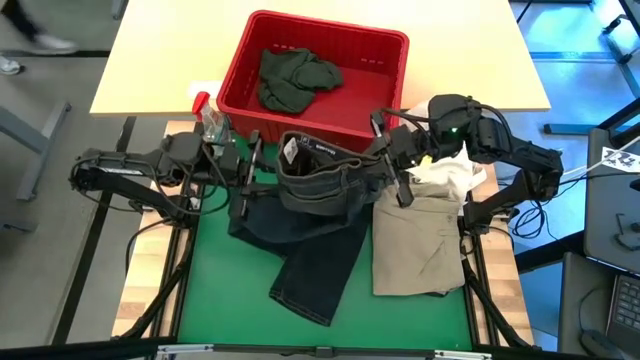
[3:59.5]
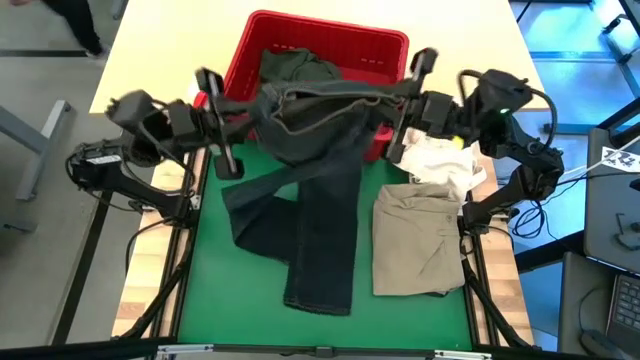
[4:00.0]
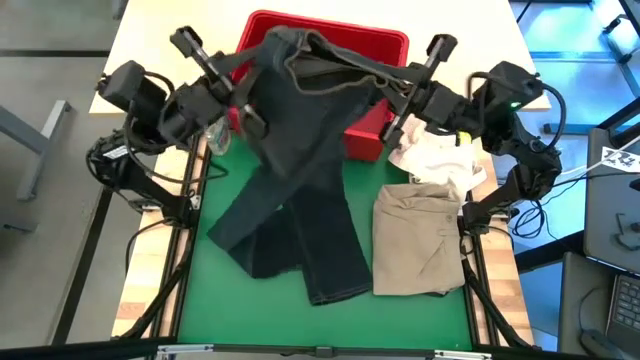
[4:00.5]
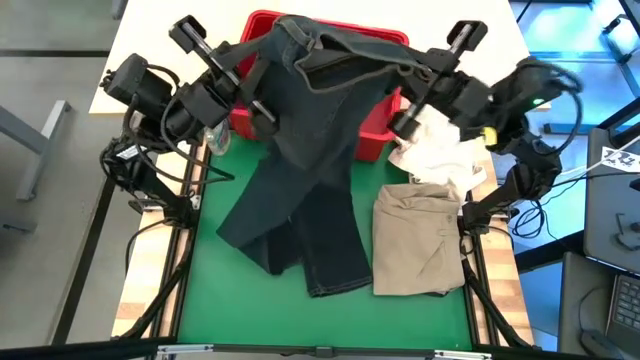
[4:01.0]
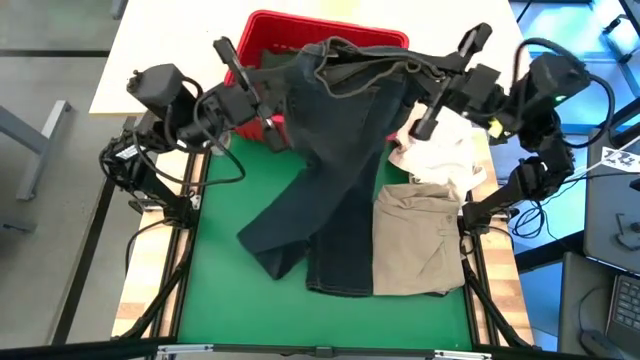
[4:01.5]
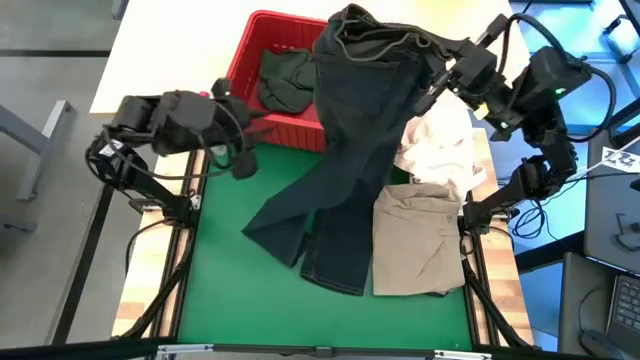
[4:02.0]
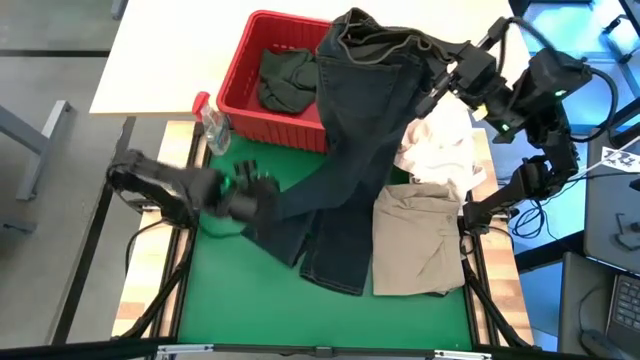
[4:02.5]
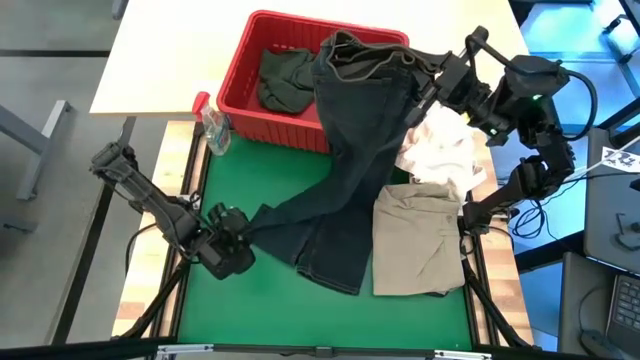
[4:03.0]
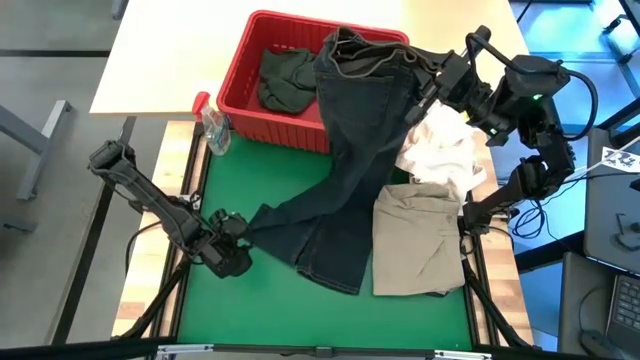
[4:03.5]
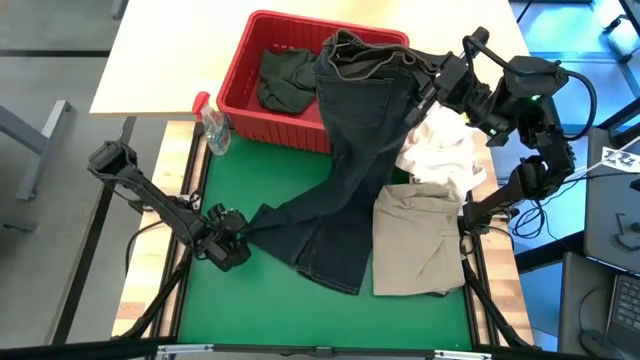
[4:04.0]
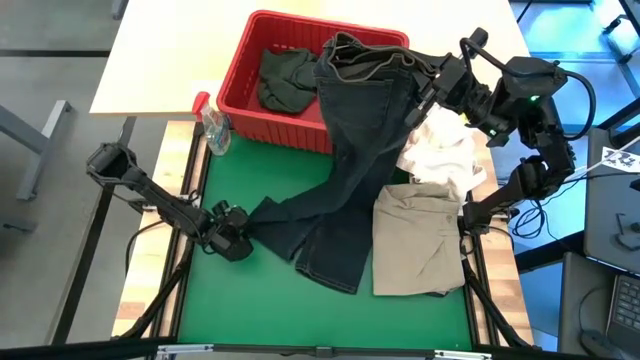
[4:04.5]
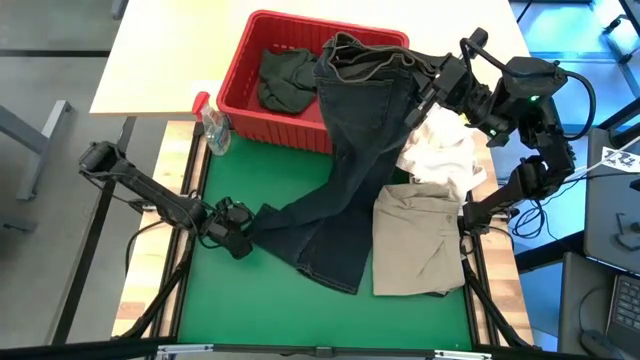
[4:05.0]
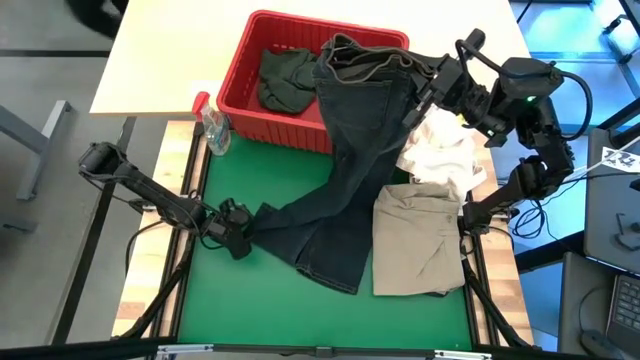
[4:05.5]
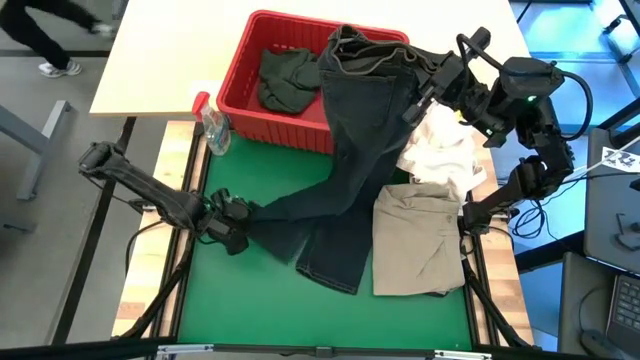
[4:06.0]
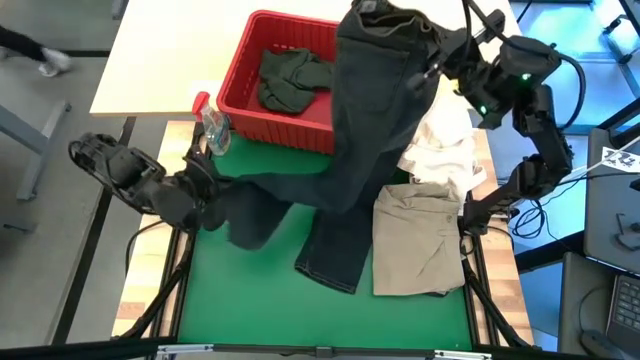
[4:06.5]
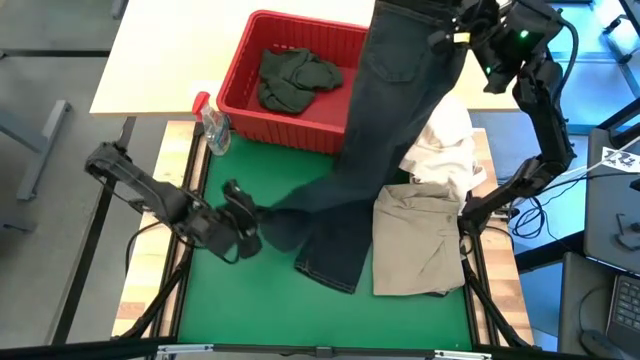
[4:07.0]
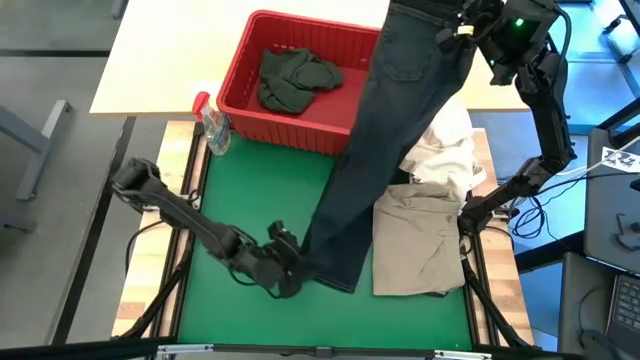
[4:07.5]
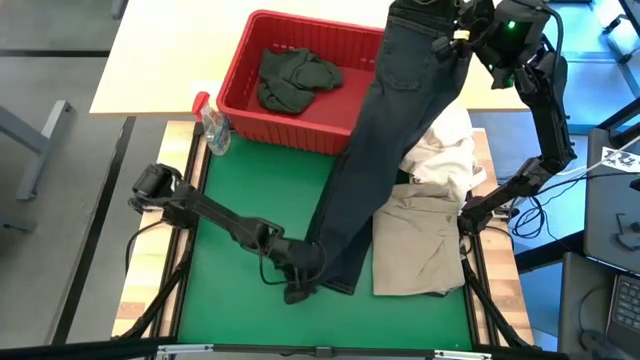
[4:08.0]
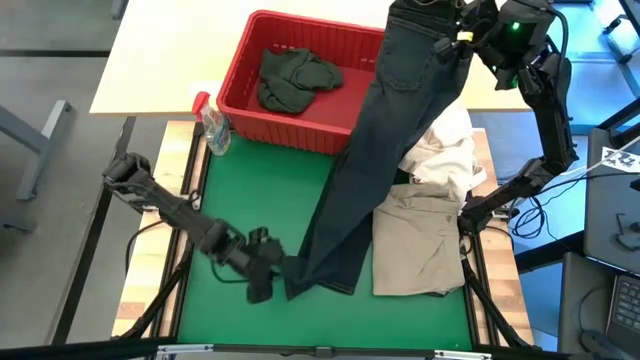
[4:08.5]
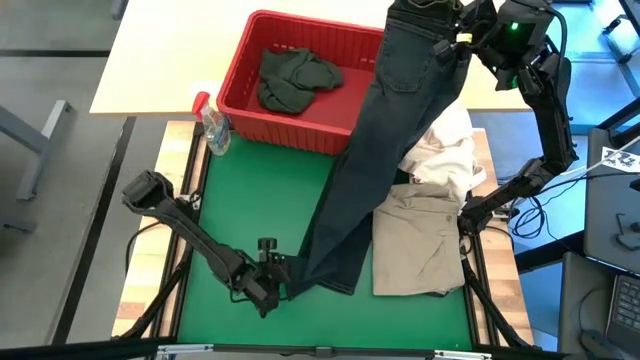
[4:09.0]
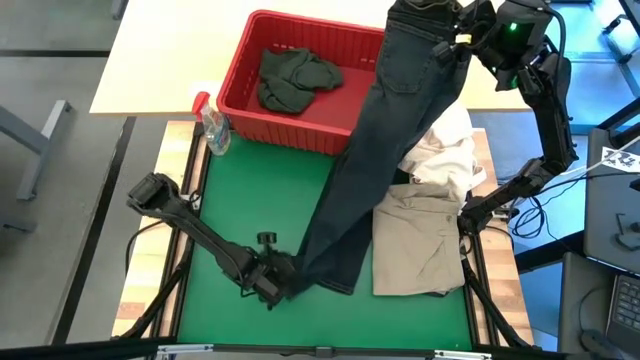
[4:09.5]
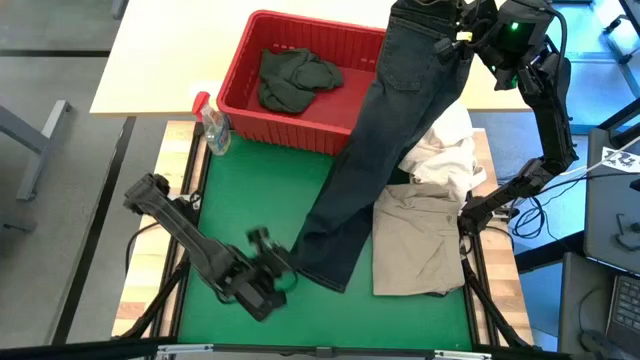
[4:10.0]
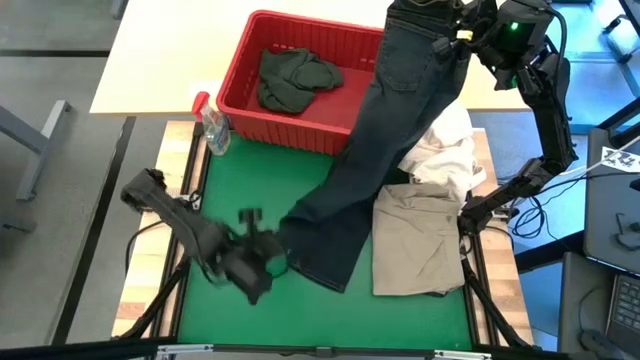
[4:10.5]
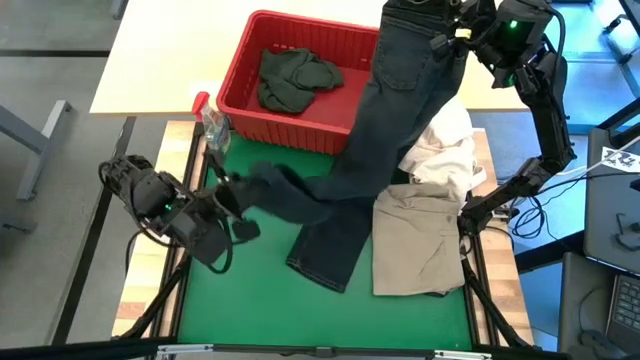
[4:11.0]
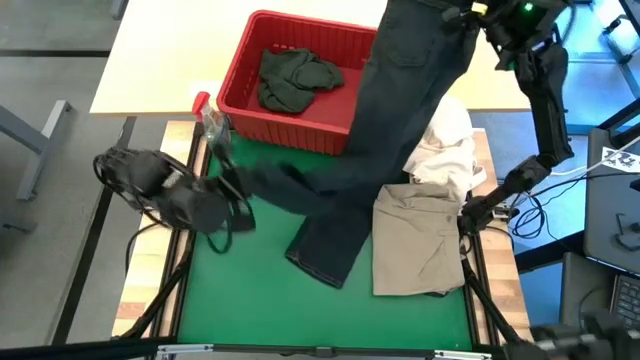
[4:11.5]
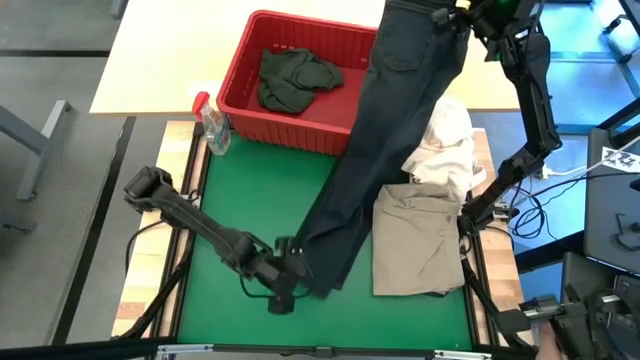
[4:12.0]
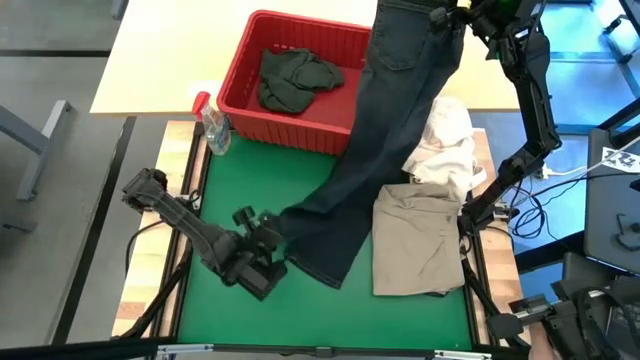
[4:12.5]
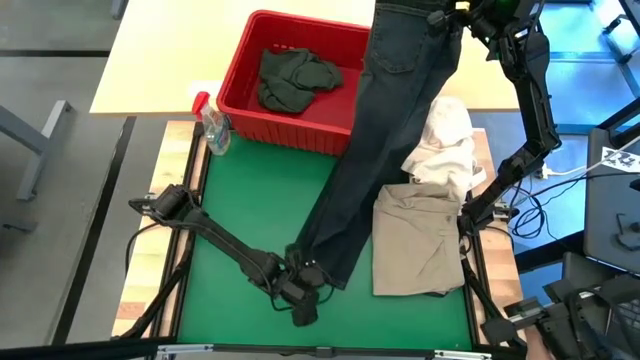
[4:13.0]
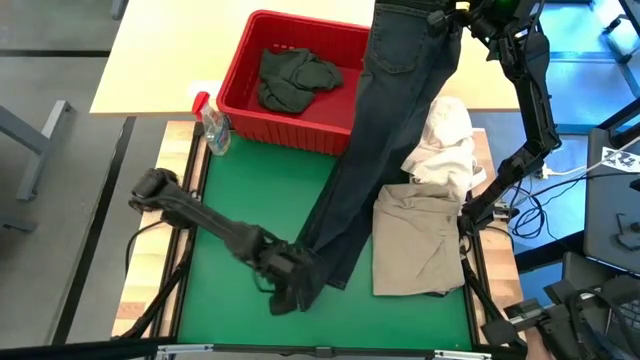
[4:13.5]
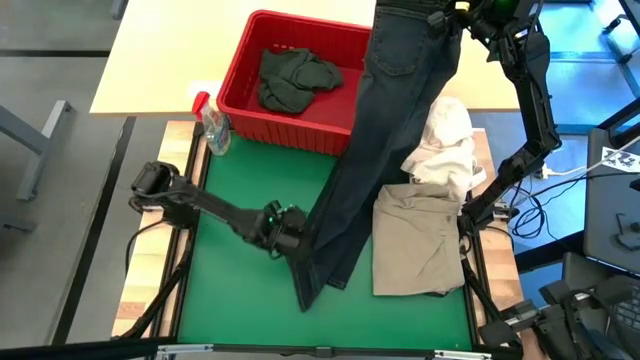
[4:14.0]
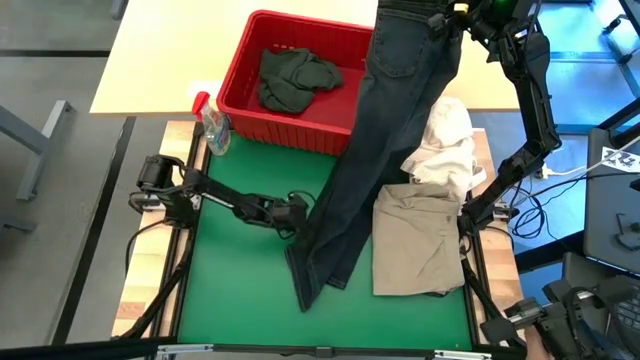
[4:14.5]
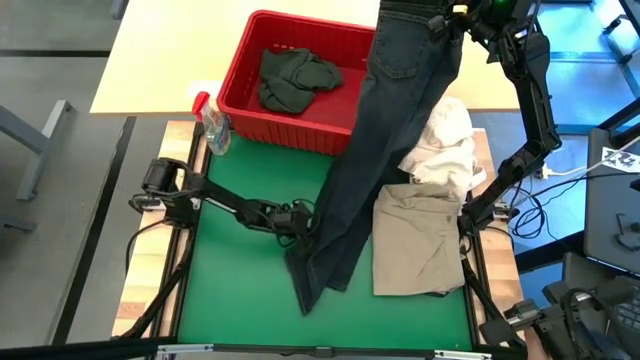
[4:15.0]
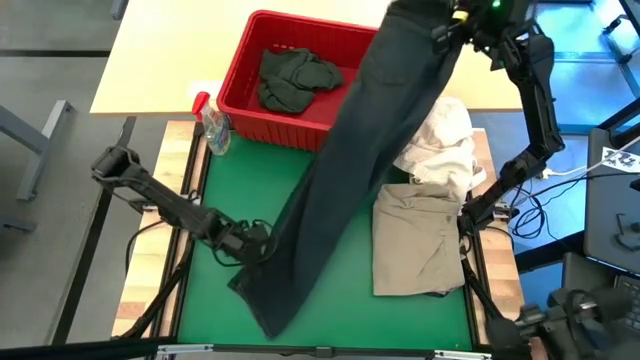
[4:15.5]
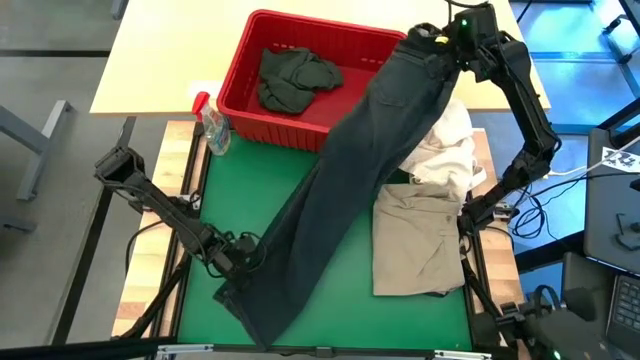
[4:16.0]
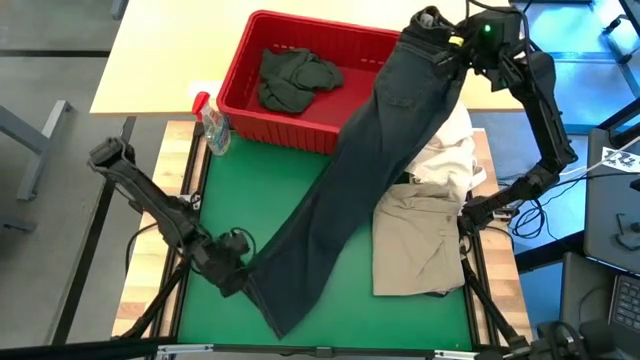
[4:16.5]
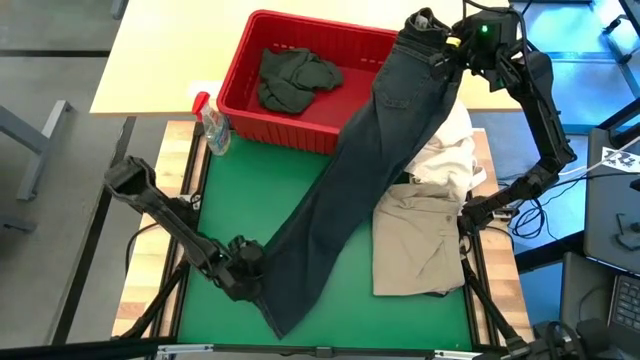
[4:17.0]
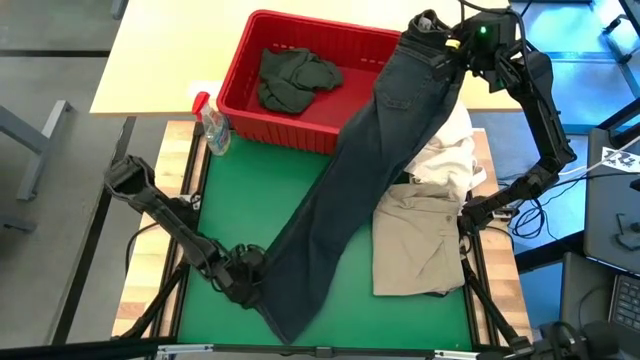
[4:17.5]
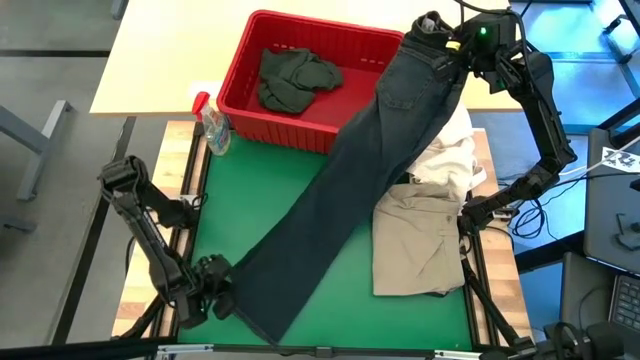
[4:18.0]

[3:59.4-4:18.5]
Task: Fold Laundry from Bin
Fold the blue pants

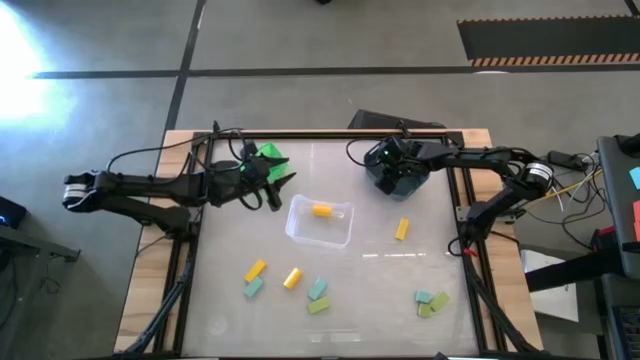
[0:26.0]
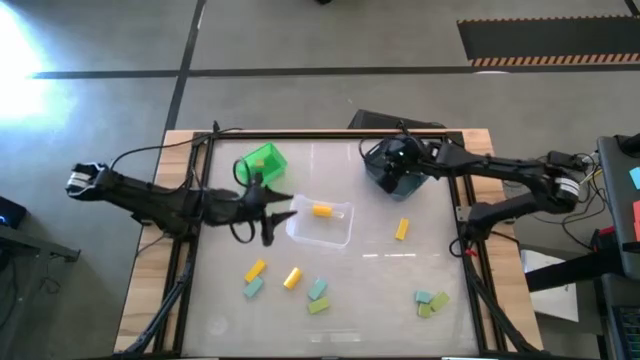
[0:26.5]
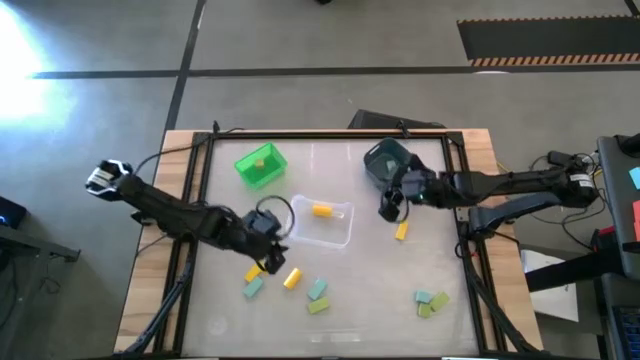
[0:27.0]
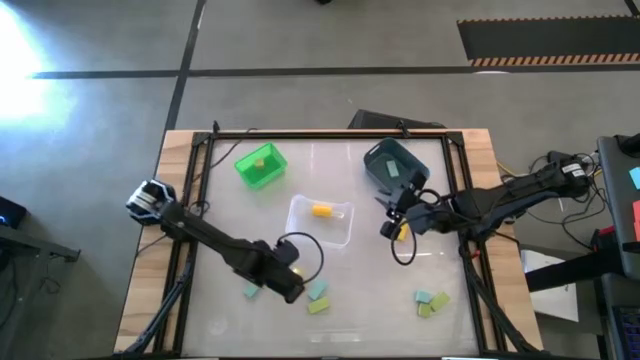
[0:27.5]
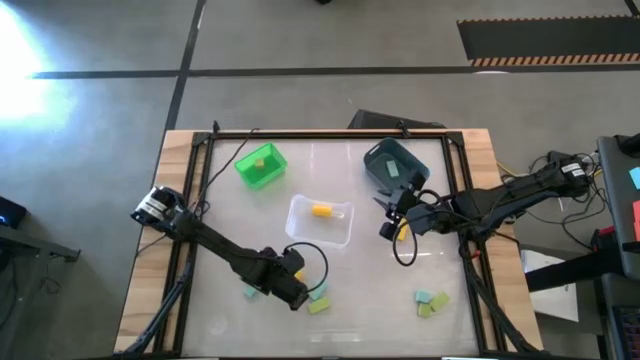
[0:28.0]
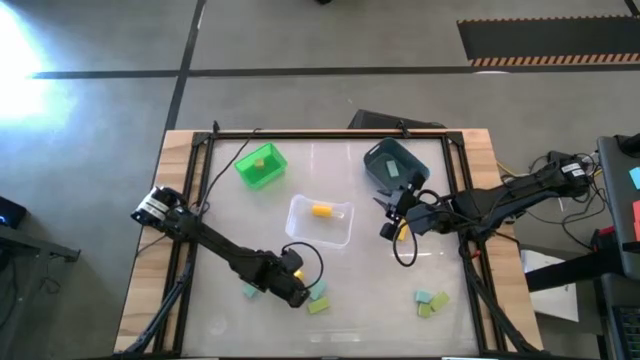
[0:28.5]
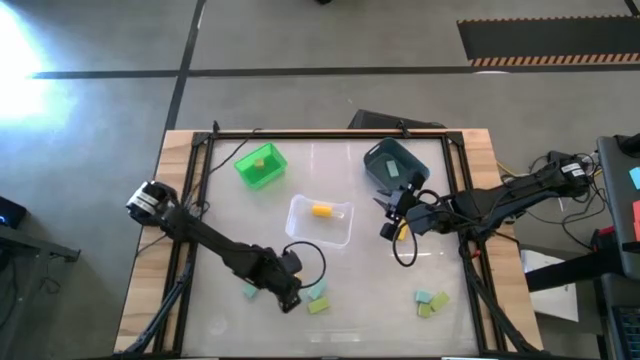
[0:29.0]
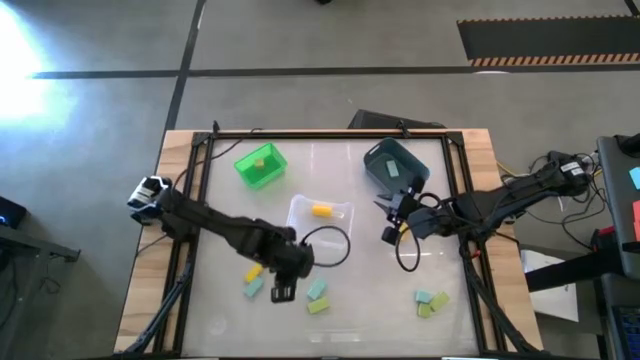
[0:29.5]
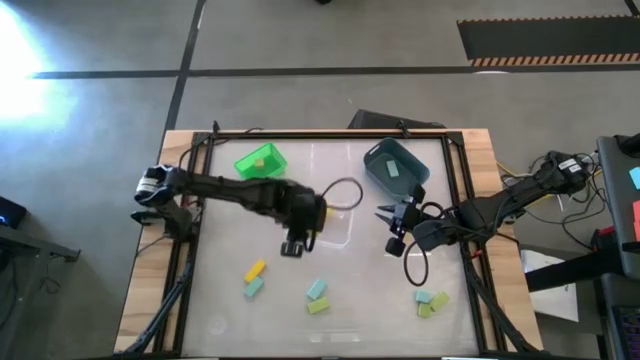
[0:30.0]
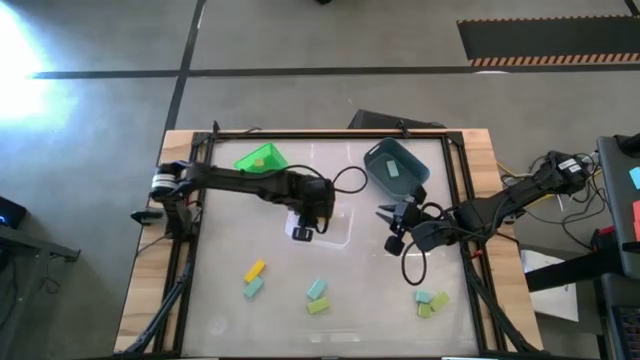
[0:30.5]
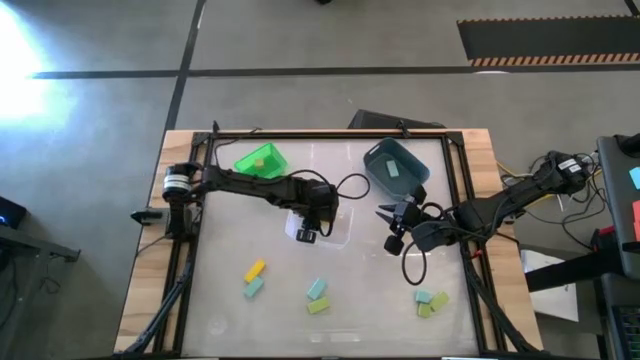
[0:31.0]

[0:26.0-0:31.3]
Task: Sort & place blocks by color
Put the yellow block into the transparent bin
